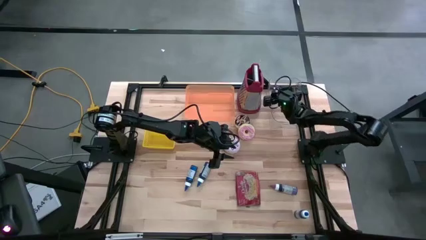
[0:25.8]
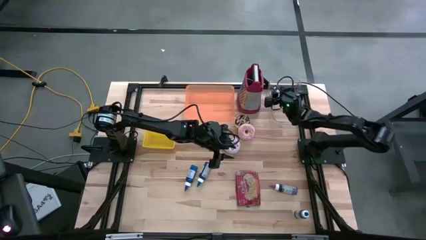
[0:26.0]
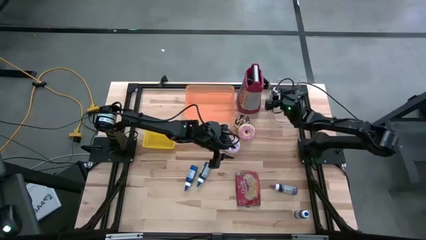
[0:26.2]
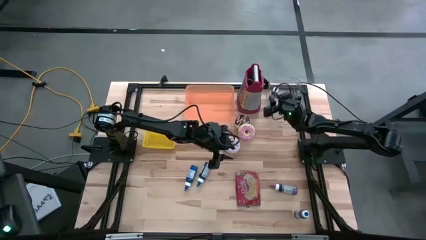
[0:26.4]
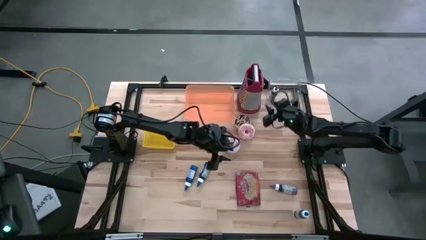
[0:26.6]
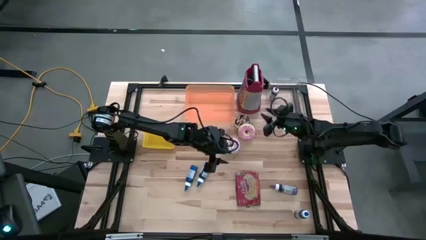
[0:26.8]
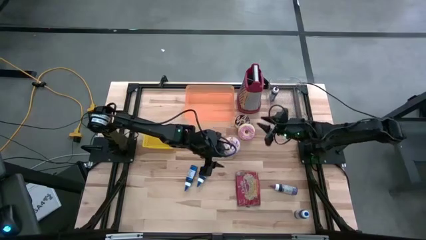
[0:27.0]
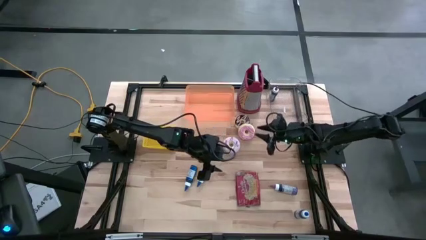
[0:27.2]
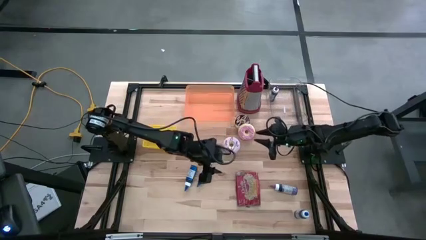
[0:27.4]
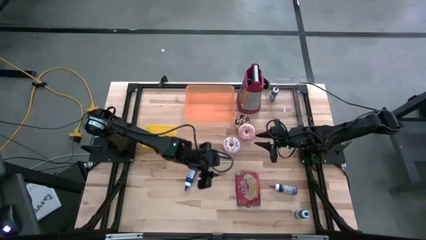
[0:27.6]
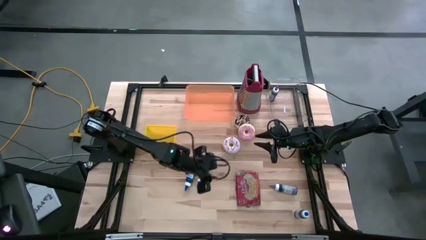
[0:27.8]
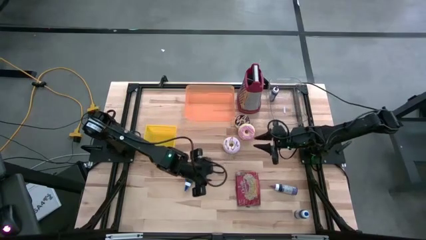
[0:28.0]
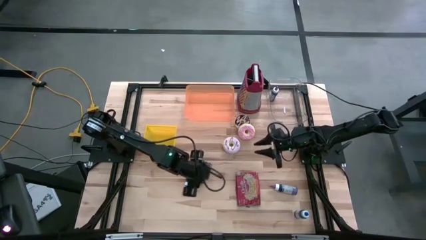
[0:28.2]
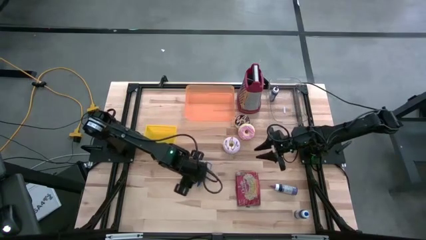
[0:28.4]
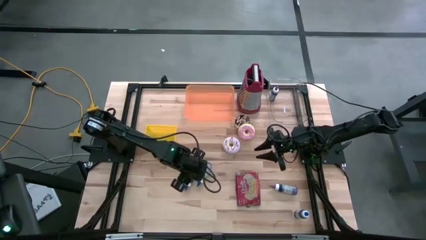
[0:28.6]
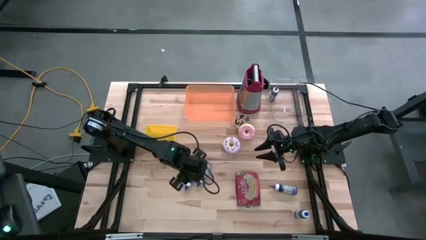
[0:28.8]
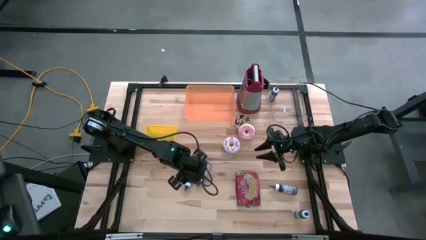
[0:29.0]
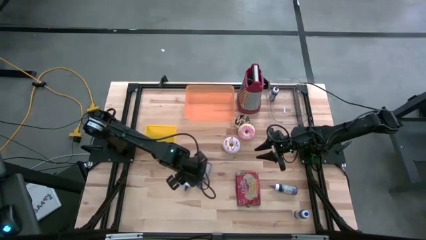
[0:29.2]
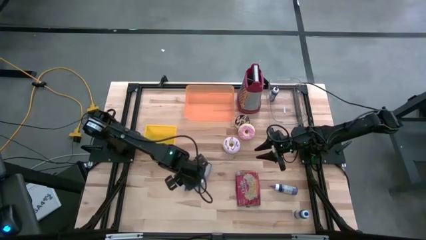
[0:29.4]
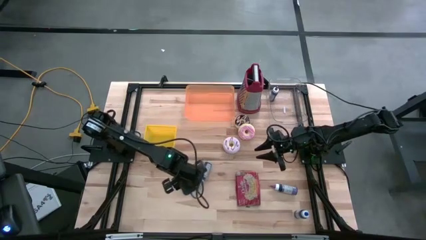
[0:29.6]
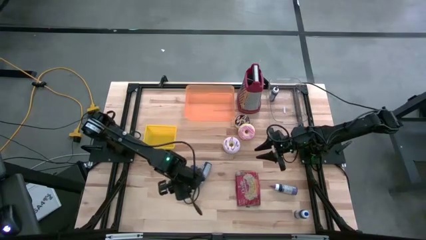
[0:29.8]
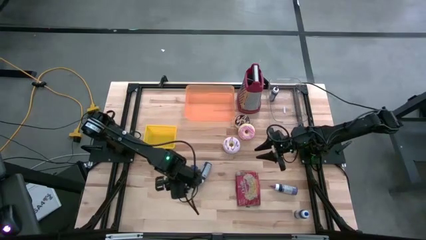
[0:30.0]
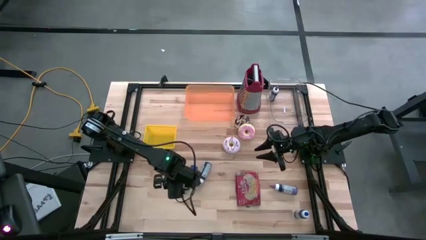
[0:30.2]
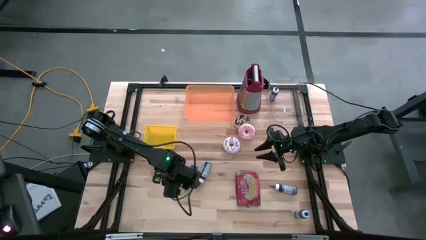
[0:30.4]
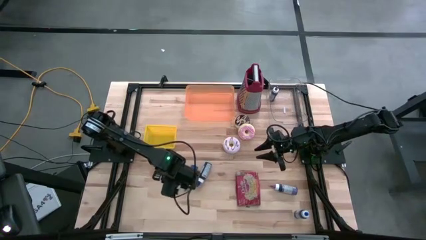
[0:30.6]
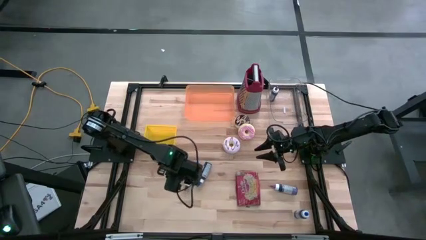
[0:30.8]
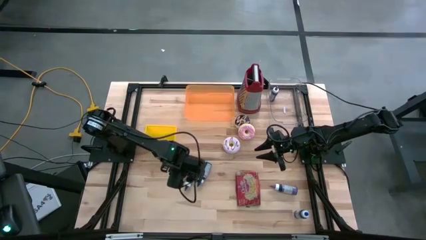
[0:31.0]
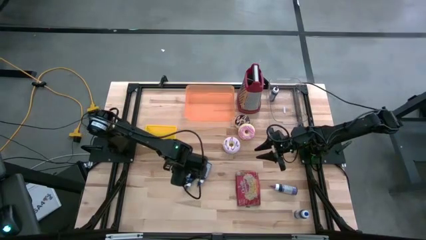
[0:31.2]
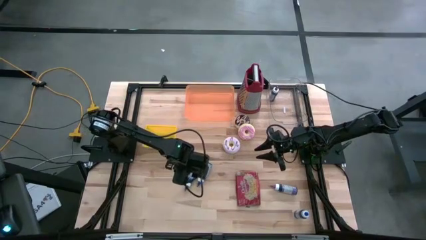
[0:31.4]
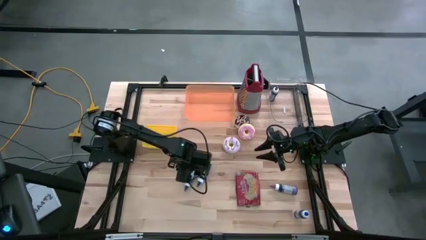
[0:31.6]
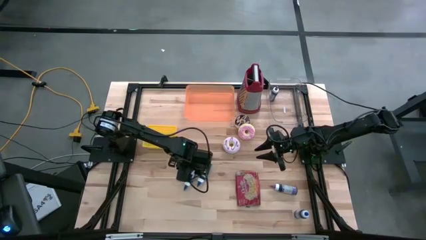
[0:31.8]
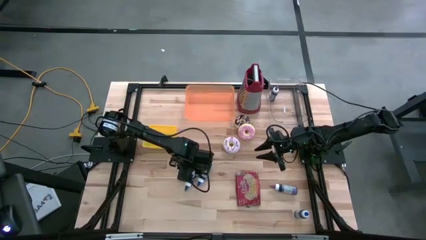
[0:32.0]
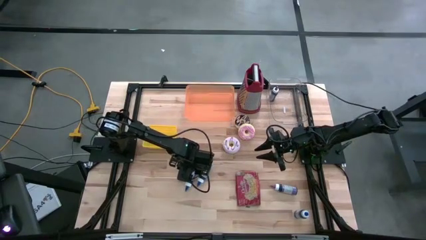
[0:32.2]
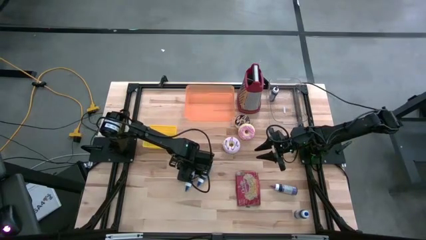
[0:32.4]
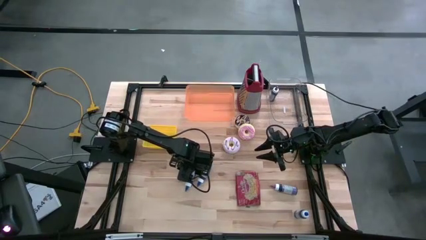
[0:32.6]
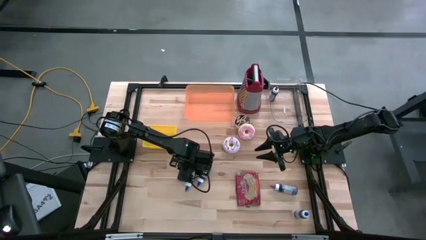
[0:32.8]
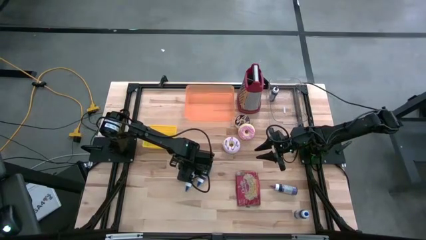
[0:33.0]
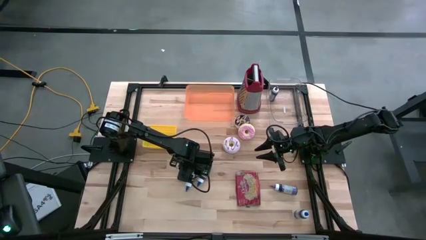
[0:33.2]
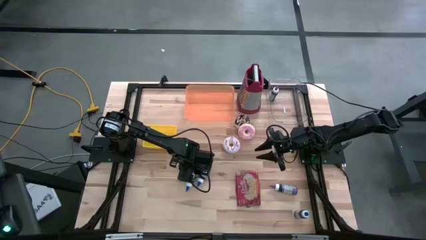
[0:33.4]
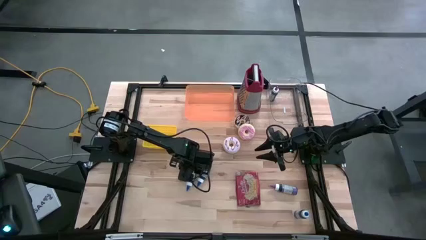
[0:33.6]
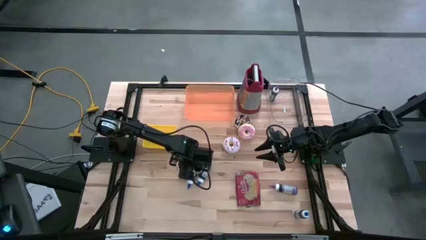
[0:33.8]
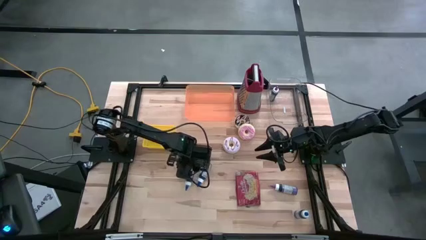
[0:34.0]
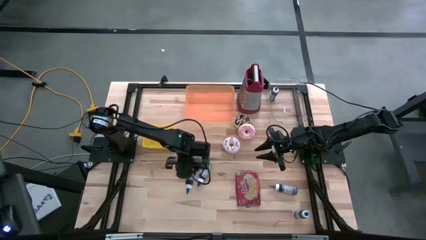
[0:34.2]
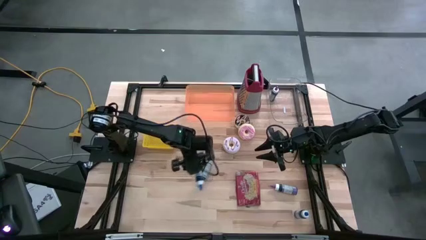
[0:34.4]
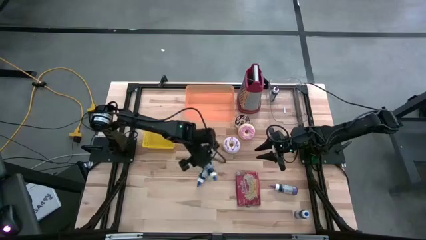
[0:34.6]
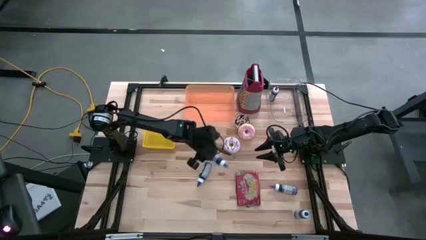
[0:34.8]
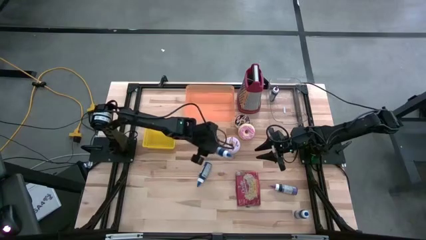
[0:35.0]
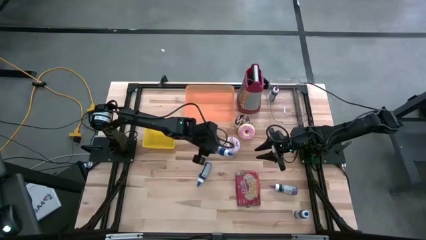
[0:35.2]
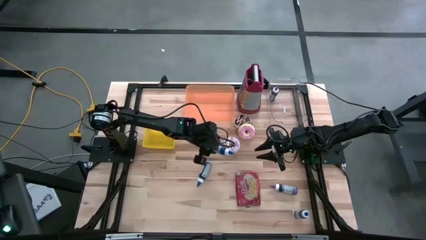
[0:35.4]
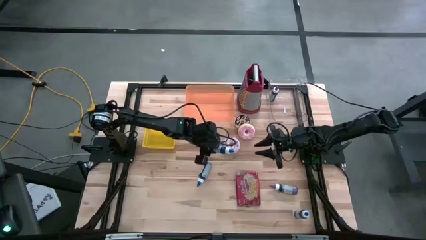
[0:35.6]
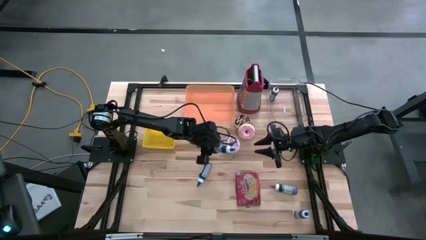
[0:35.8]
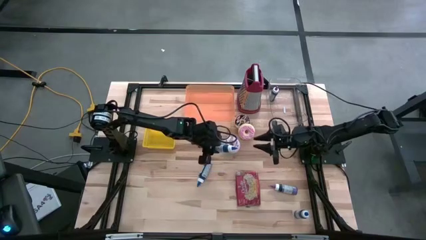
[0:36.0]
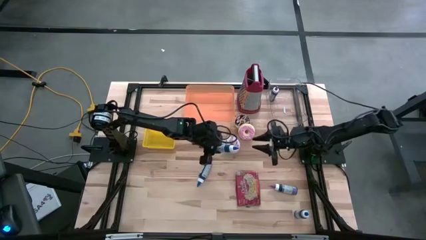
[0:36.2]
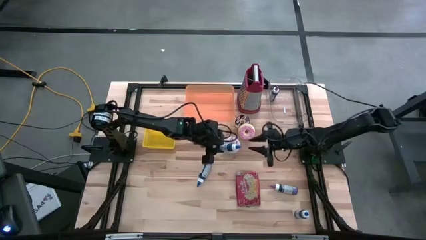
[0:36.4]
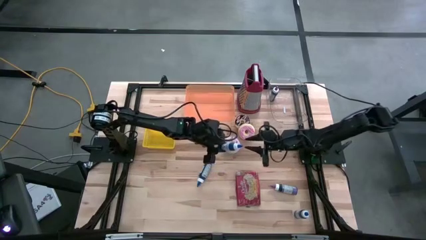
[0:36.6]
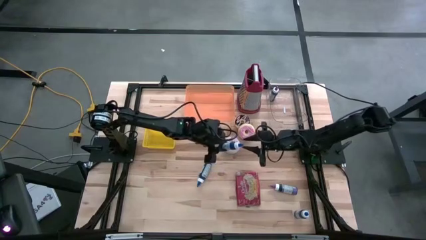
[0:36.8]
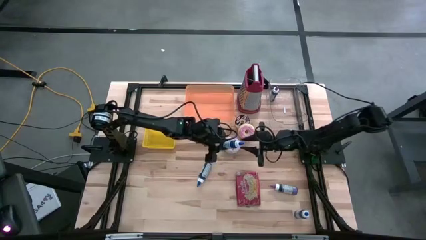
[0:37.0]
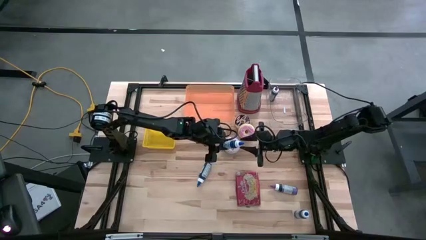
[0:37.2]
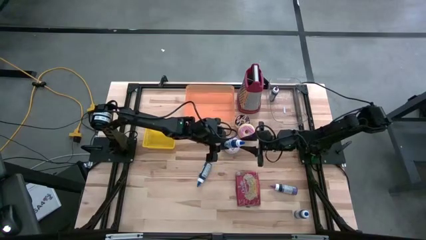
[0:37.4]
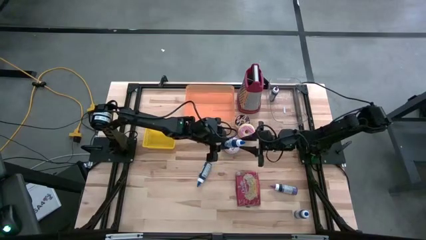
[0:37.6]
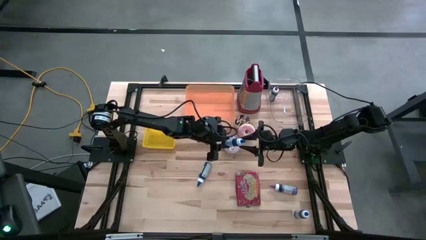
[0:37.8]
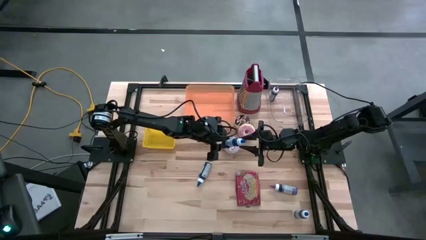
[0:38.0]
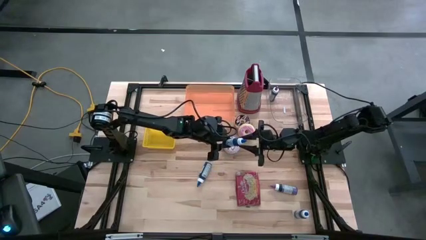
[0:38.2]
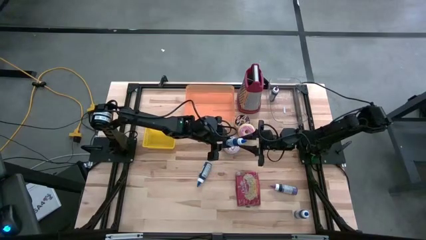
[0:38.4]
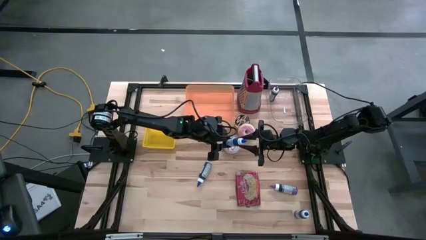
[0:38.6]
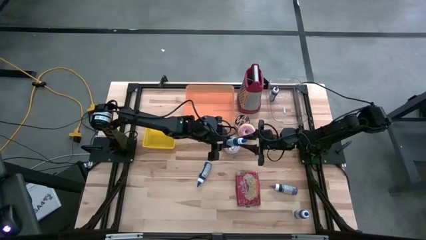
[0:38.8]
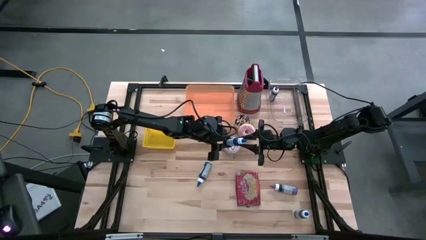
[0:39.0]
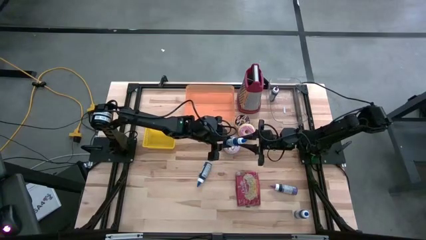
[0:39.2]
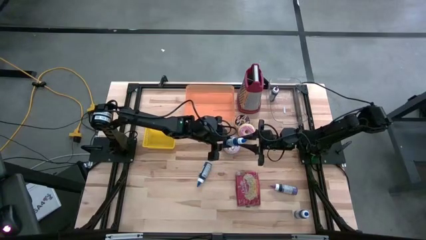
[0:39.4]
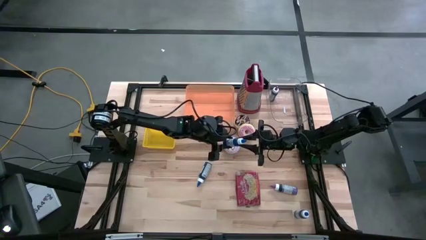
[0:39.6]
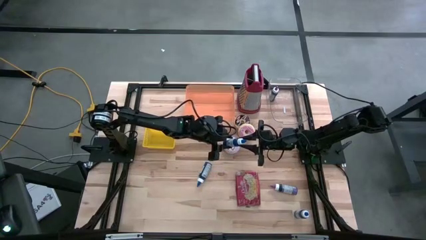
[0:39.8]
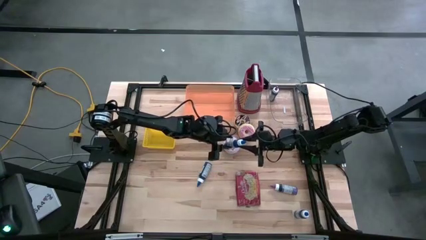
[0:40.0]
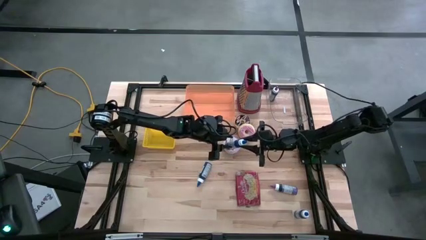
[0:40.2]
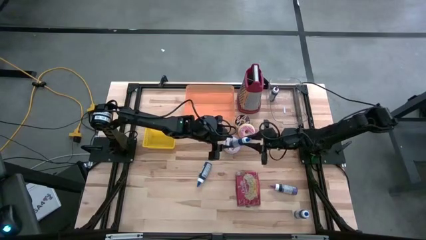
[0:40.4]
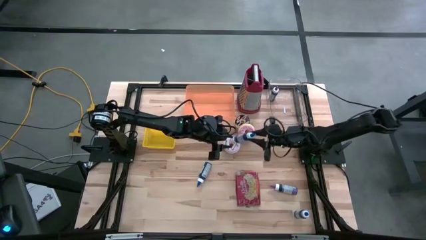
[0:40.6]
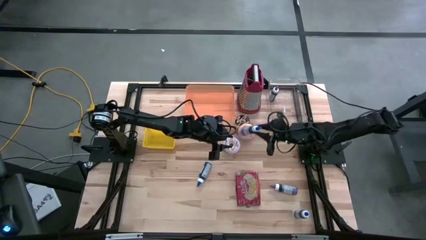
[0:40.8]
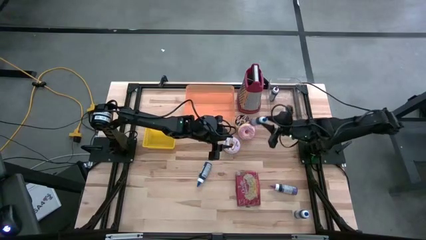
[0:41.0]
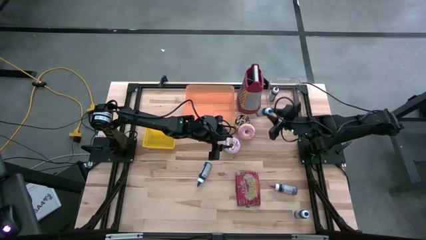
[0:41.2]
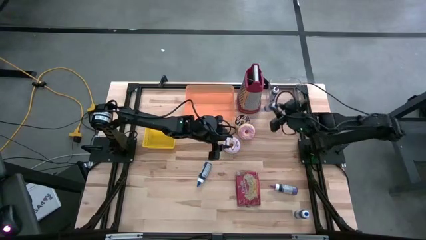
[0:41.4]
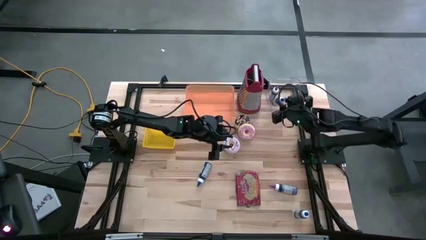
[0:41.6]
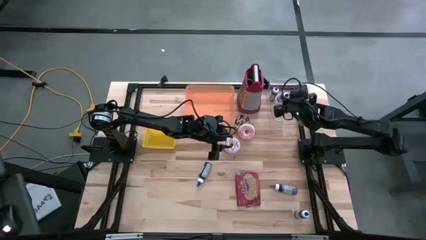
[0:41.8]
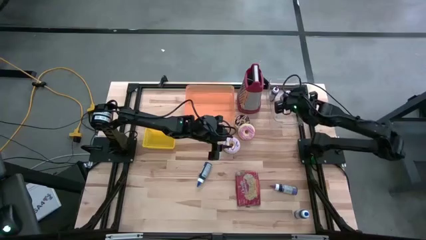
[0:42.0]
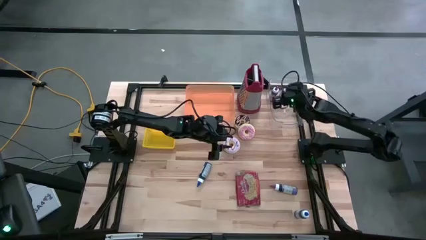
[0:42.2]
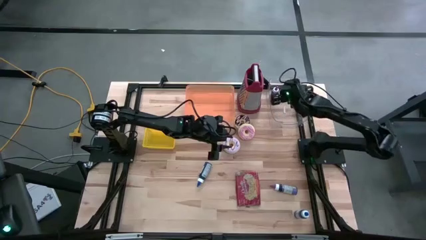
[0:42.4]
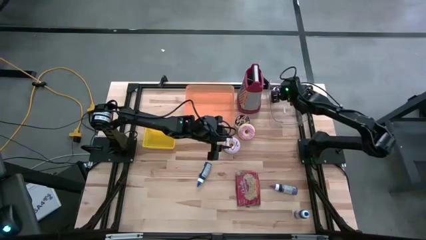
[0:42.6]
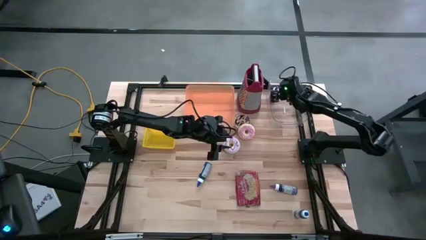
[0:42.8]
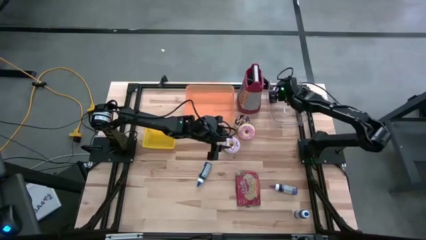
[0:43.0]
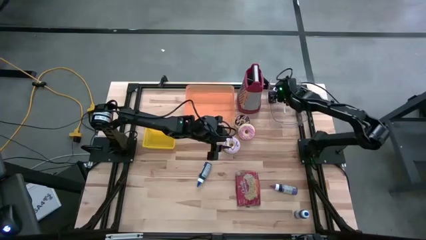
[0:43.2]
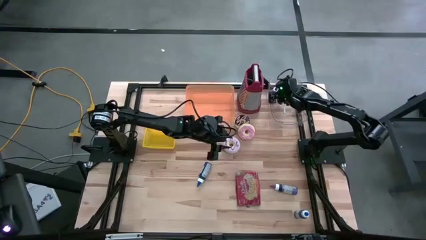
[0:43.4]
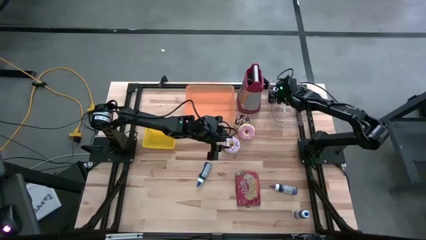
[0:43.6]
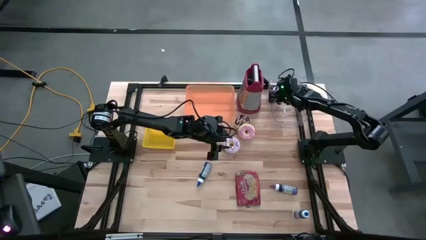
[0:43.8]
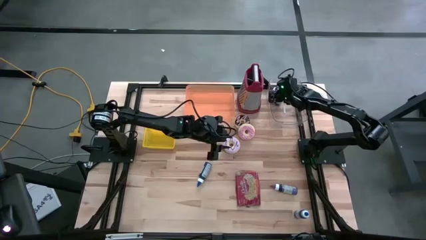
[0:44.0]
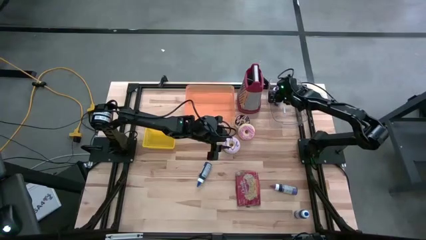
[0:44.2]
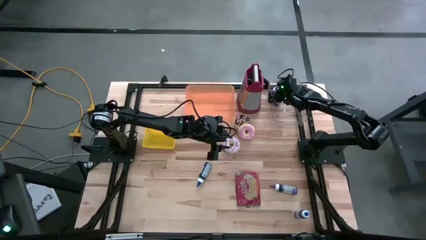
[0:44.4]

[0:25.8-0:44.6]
Task: Pick & Place Food Item
Put the left blue food coloring bottle into the transparent bin
